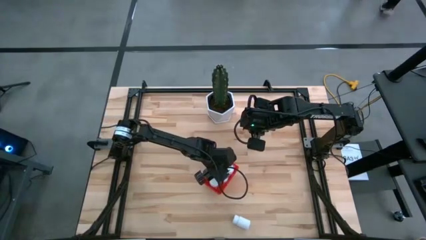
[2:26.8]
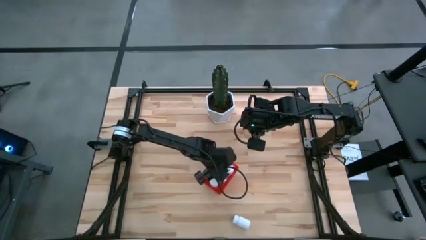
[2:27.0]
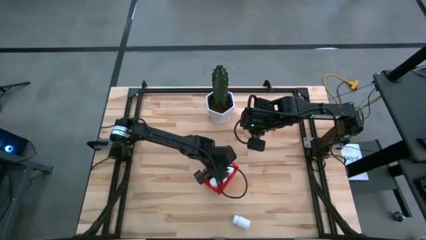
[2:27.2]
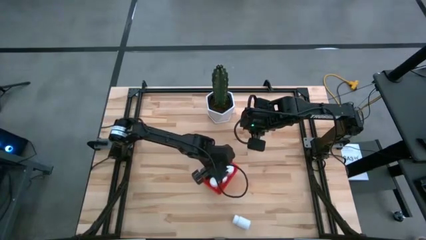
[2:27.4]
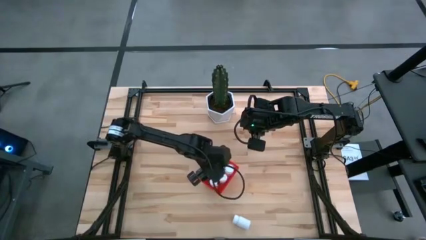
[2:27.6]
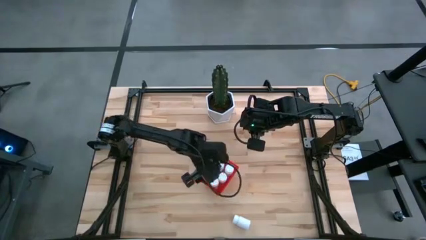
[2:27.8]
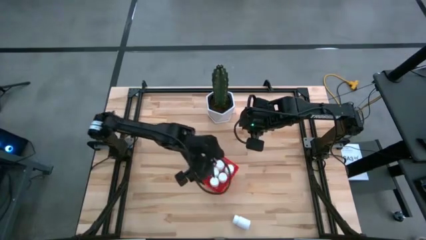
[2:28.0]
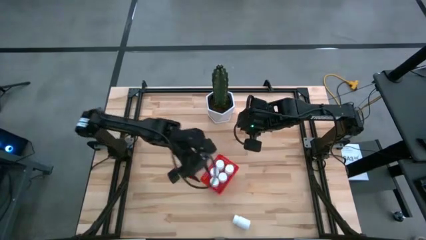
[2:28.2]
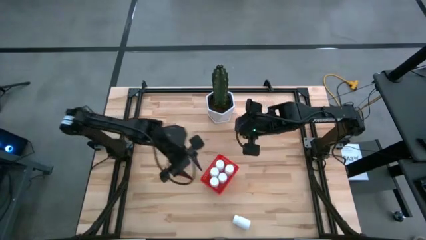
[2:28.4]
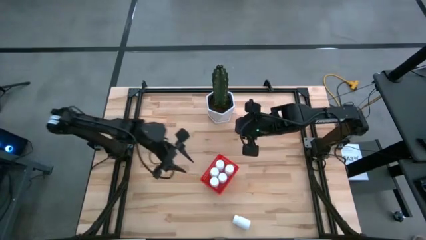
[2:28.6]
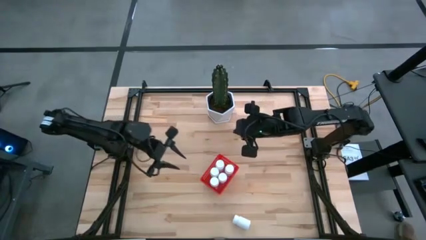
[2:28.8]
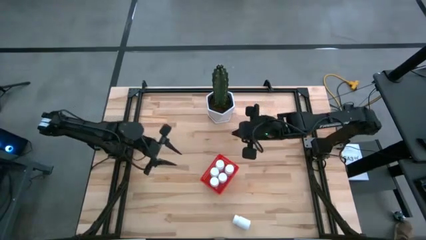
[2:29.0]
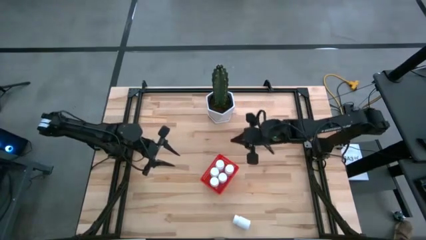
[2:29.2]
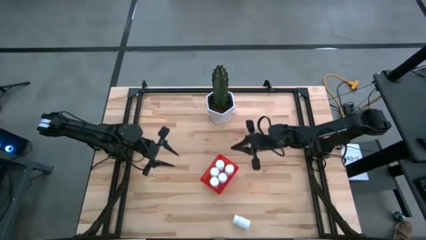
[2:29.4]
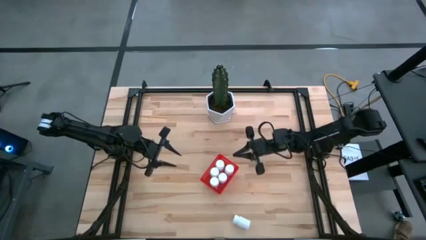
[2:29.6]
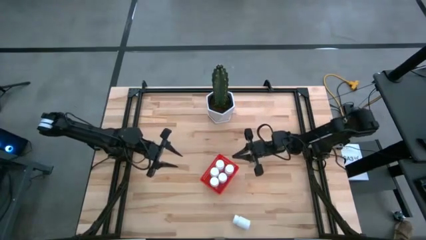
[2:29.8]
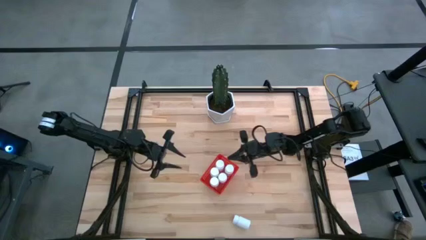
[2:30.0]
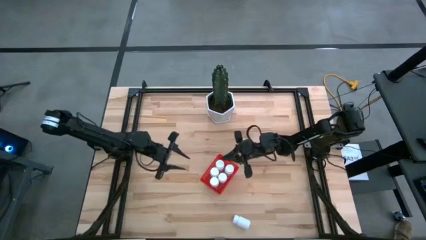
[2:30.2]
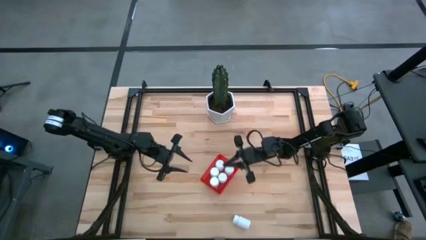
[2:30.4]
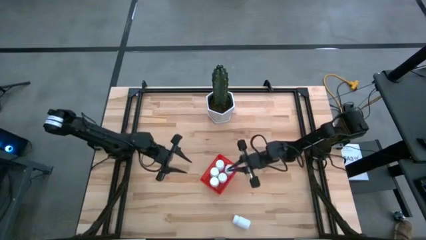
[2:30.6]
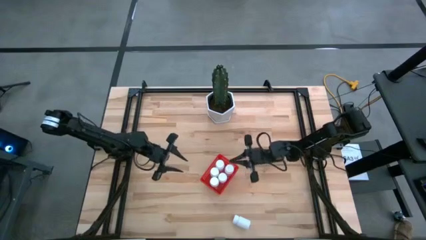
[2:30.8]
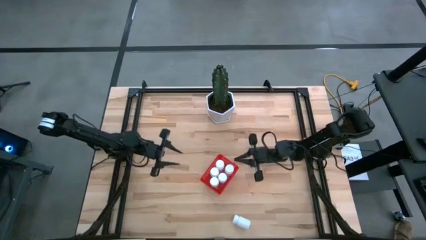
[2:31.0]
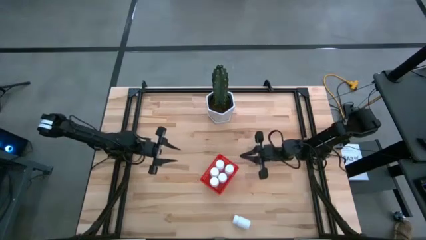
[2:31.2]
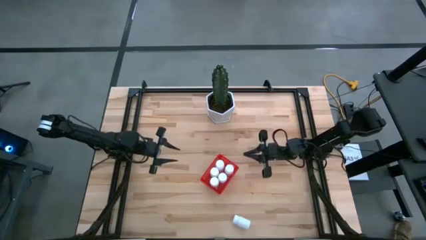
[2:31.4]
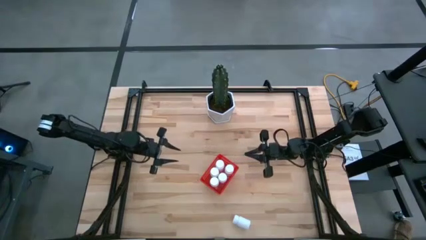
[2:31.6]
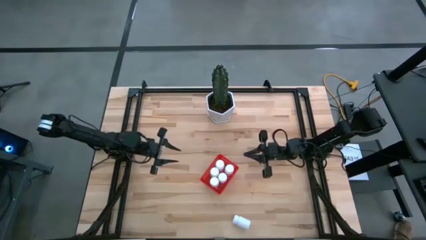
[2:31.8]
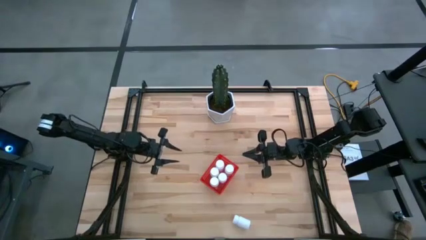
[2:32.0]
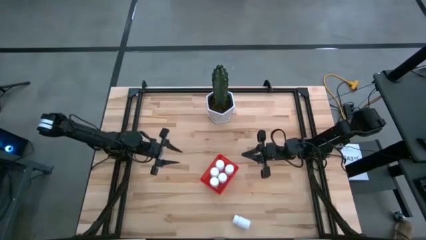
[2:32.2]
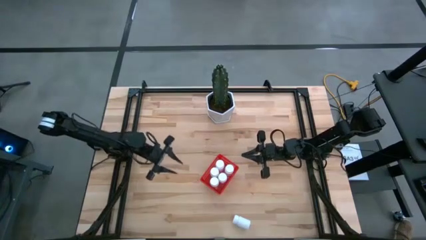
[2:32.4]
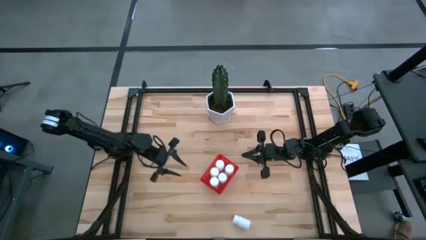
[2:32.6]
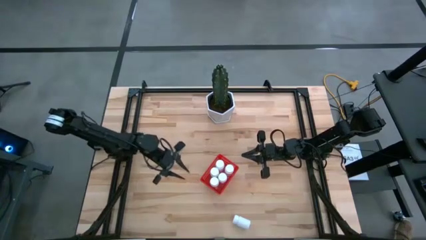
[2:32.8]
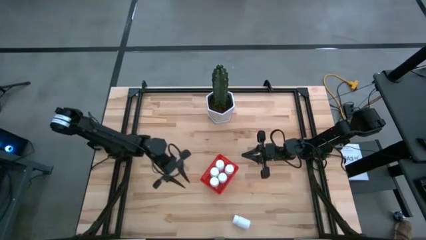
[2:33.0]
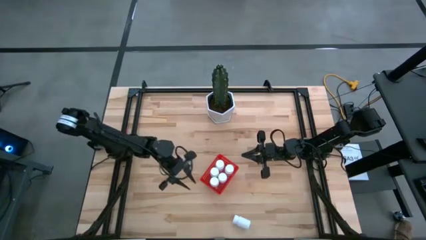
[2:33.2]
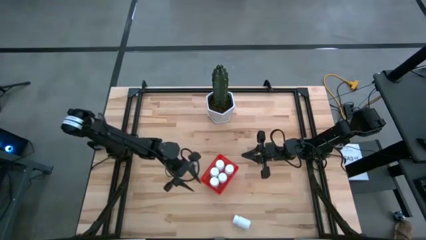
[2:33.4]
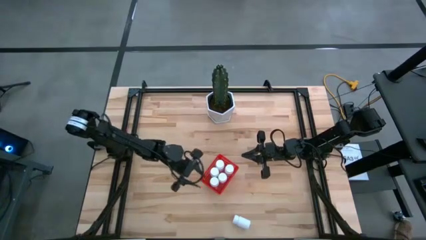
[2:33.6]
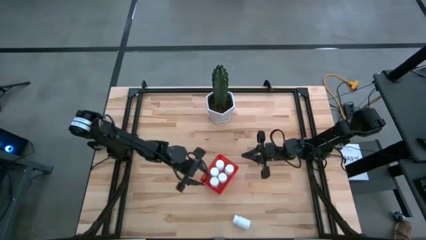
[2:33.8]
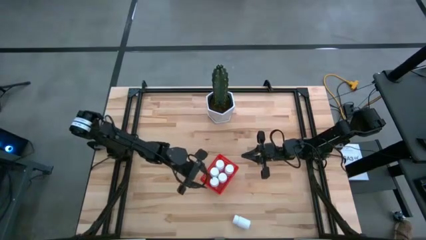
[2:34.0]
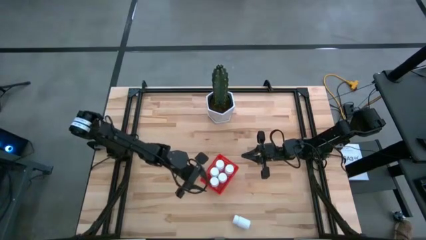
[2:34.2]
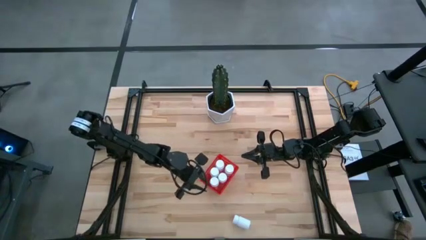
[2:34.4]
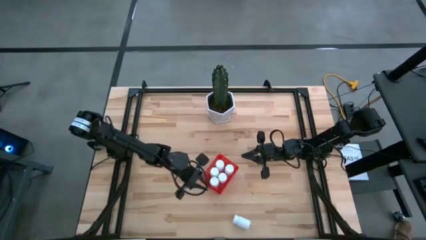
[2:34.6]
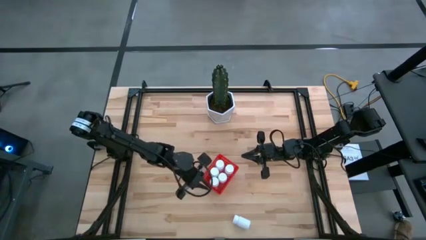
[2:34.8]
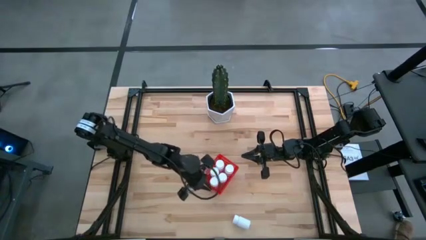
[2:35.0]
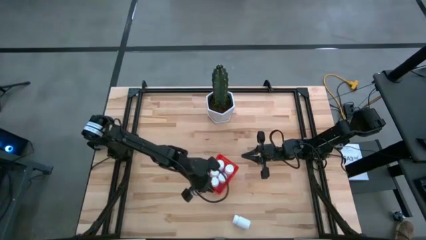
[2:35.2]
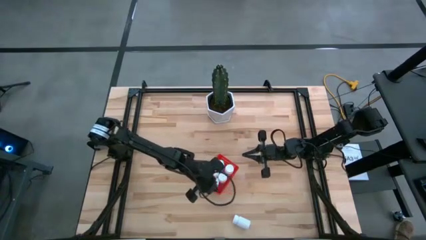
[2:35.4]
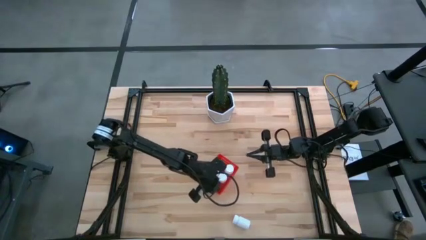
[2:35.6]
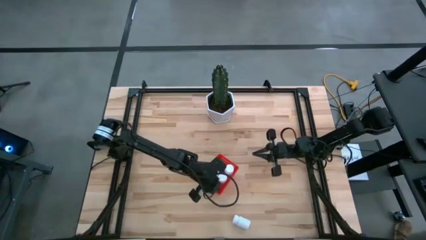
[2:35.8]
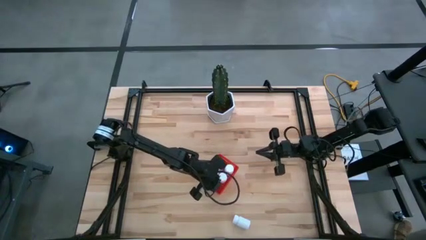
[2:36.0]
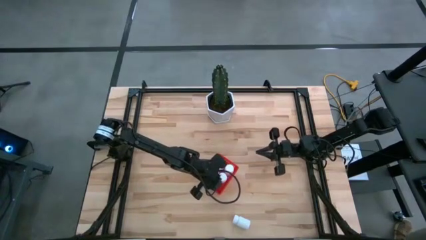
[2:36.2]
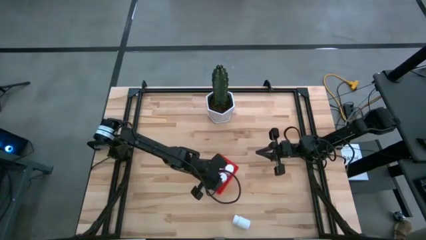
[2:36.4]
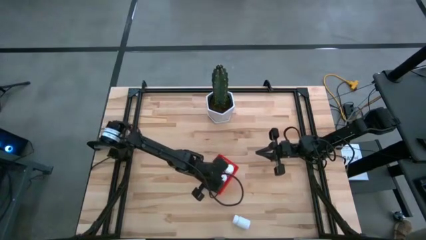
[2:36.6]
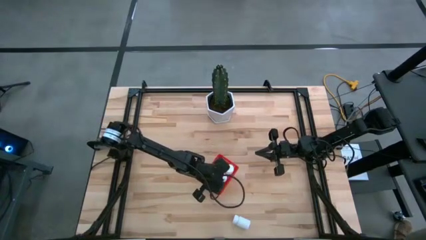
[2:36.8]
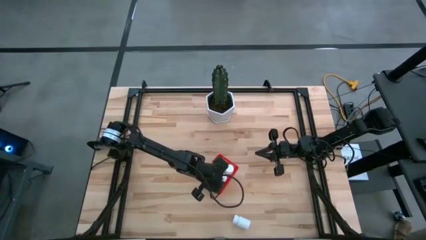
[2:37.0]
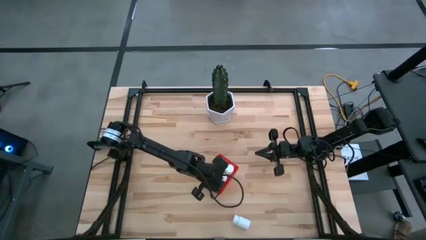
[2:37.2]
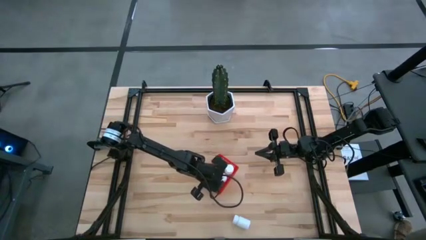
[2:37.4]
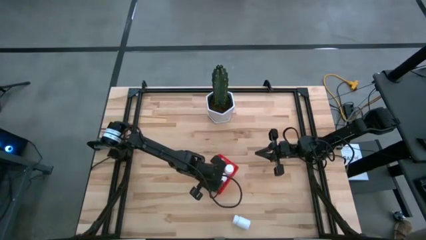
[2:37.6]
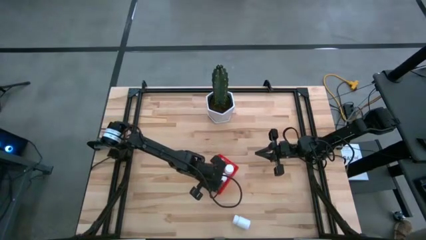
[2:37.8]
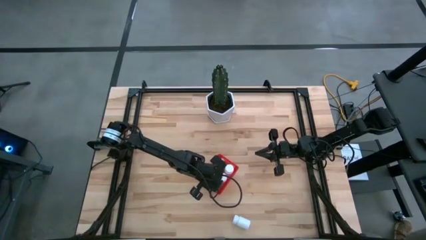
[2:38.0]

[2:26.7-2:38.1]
Task: Pick and place pill bottles into a basket
Adjust the white pill bottle in the red bin

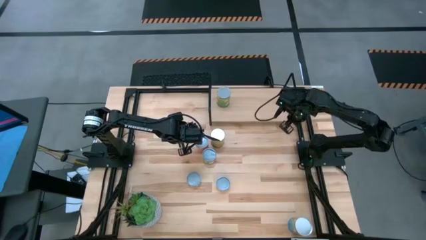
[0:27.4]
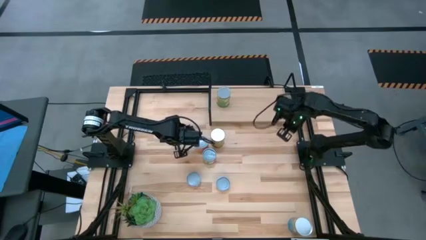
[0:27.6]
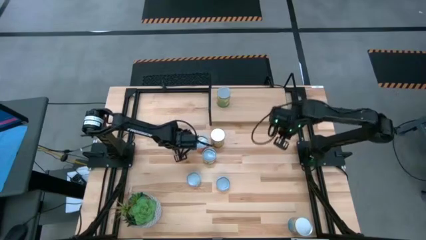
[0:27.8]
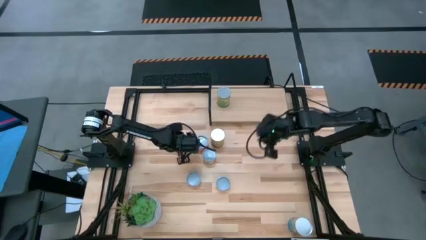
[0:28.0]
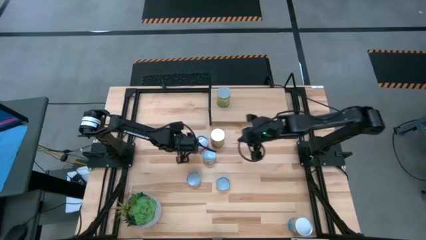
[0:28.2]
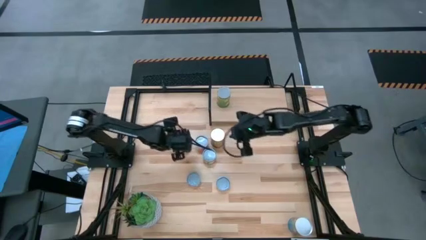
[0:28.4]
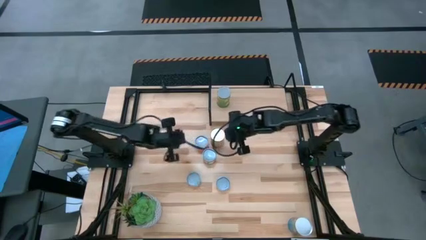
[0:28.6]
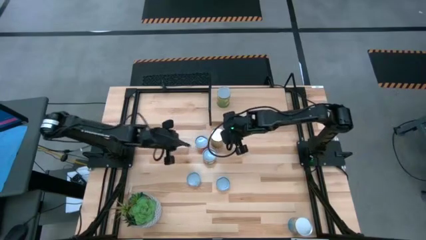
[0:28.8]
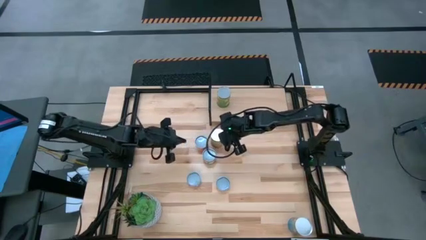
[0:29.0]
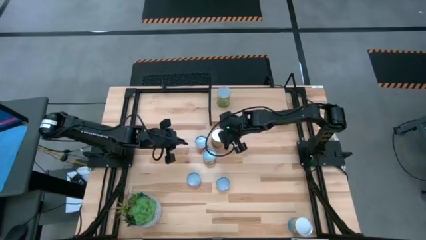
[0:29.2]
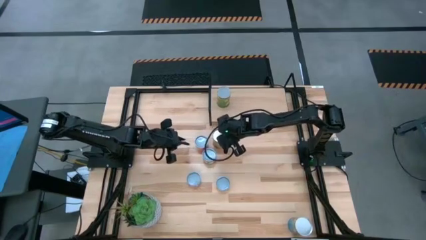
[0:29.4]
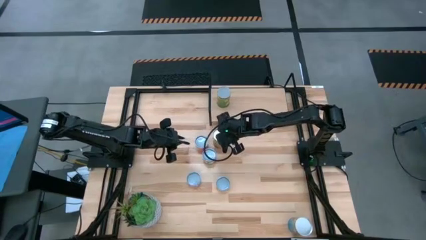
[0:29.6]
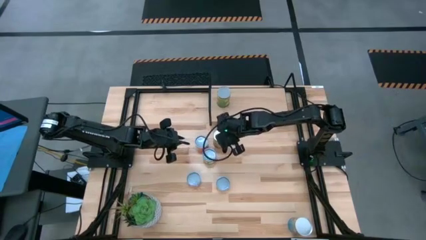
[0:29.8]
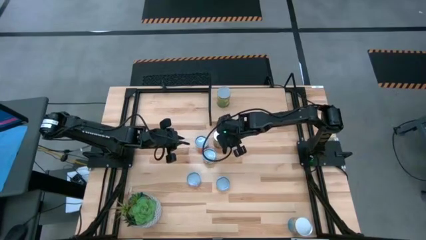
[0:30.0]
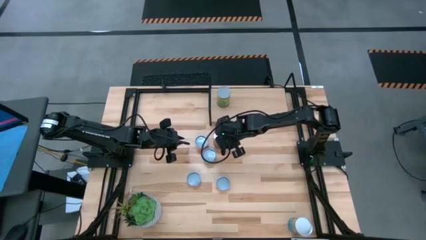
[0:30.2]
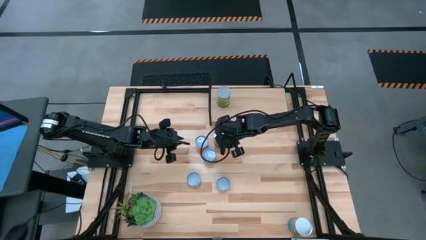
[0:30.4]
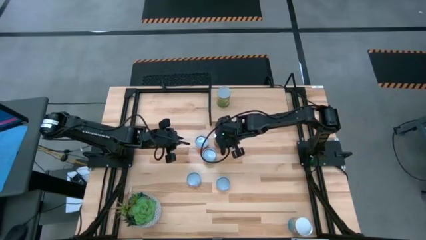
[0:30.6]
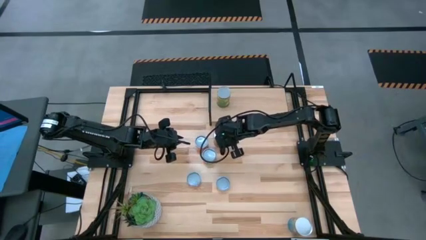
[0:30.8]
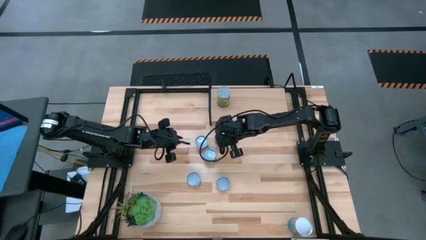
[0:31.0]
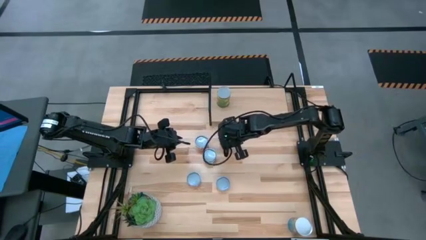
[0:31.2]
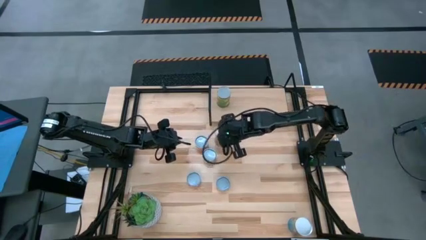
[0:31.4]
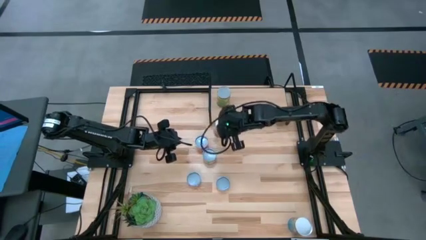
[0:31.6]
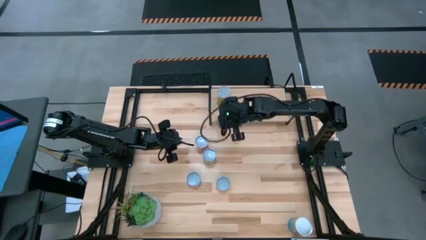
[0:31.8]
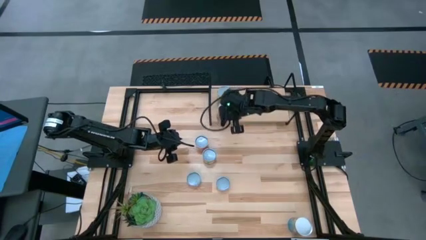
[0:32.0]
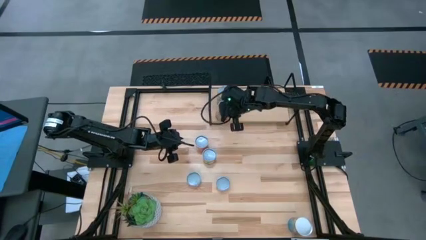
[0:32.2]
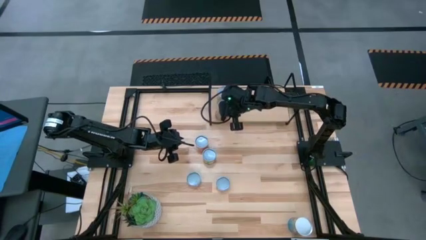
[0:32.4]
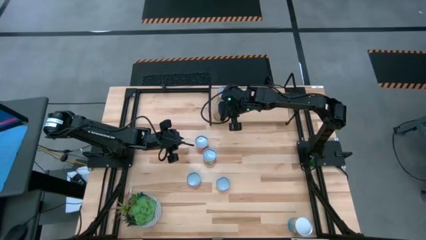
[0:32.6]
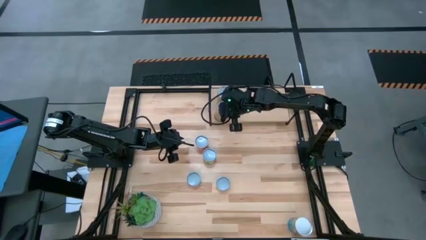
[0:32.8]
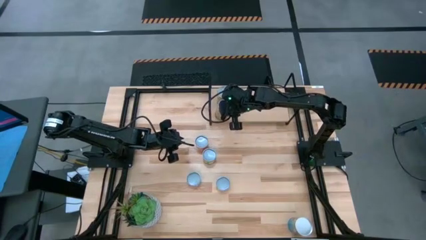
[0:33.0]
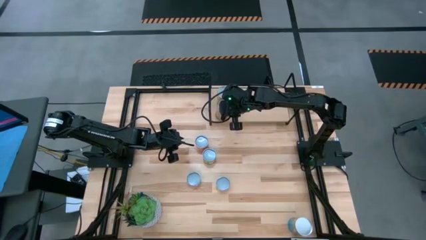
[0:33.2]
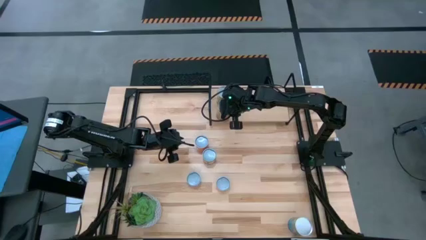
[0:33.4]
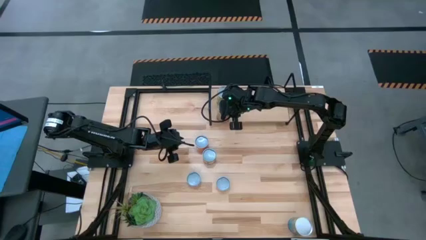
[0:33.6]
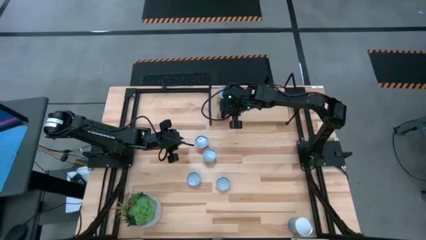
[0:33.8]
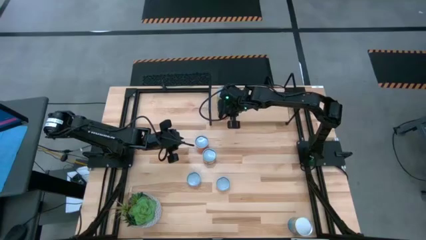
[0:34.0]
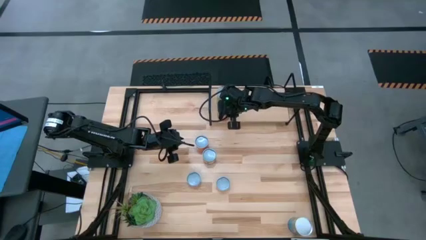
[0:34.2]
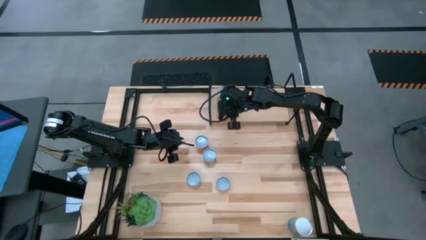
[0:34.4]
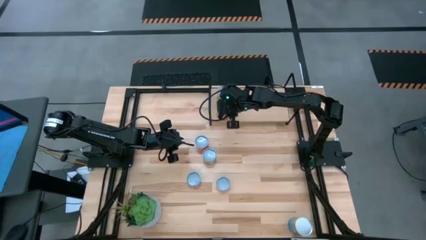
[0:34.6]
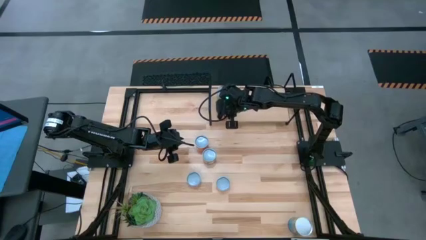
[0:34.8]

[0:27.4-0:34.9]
Task: Pick and place cans onto a shelf
Put the canned green beans on the shelf
